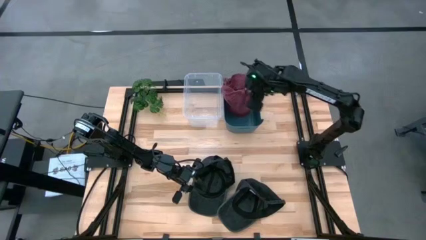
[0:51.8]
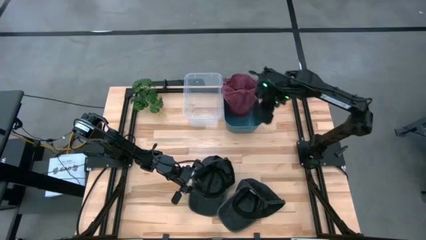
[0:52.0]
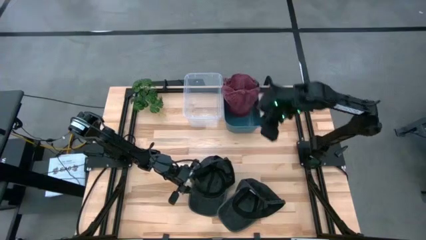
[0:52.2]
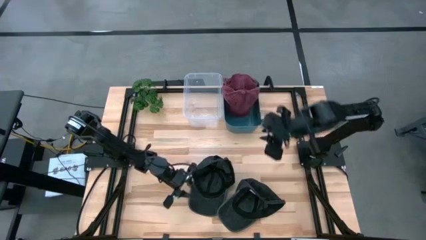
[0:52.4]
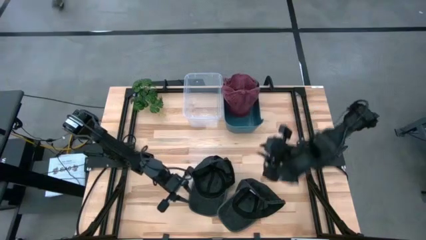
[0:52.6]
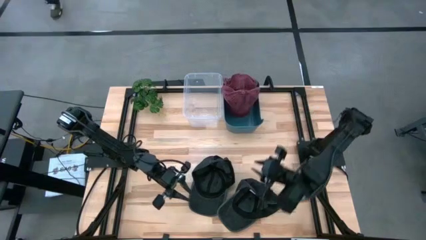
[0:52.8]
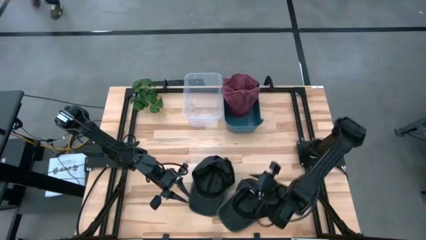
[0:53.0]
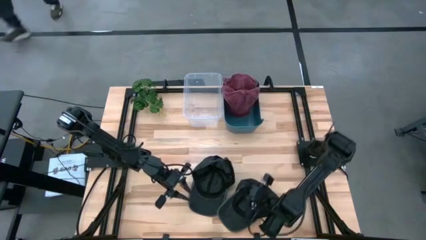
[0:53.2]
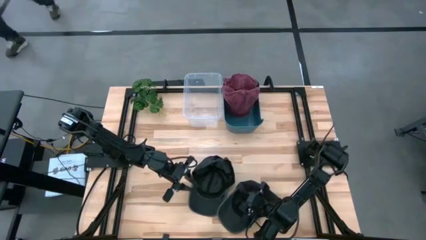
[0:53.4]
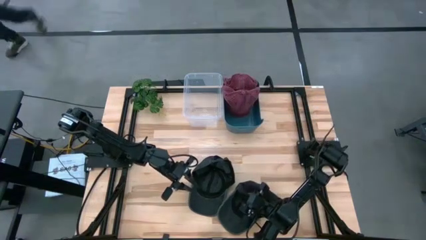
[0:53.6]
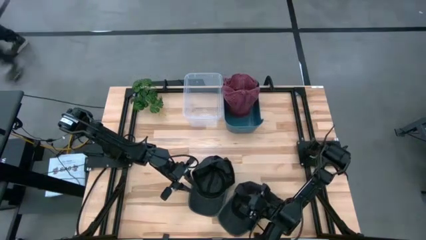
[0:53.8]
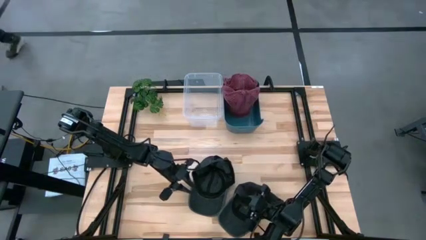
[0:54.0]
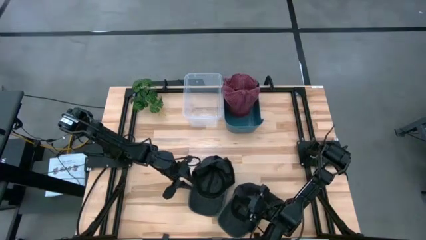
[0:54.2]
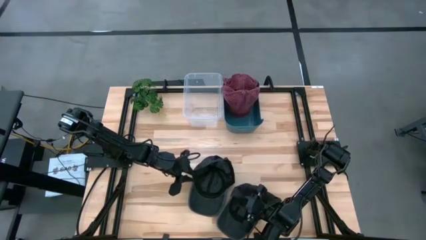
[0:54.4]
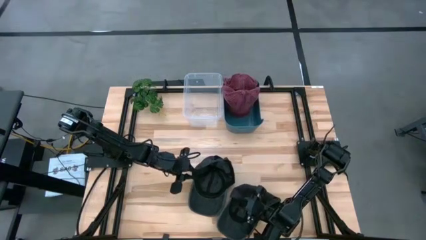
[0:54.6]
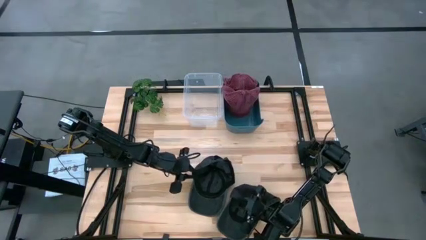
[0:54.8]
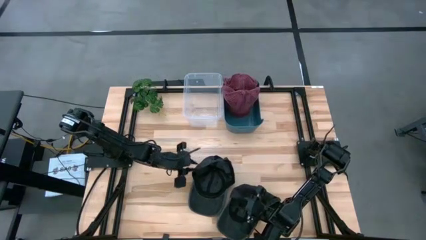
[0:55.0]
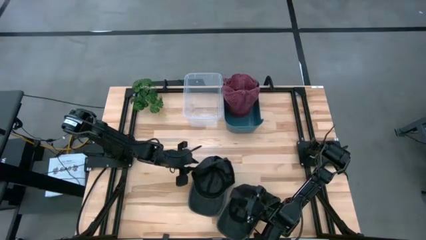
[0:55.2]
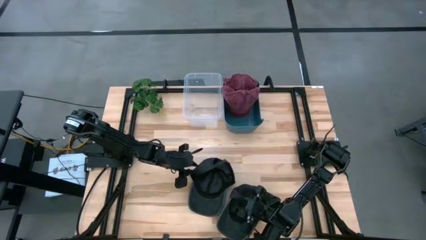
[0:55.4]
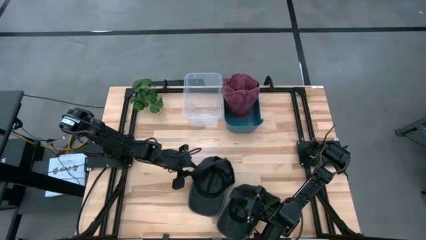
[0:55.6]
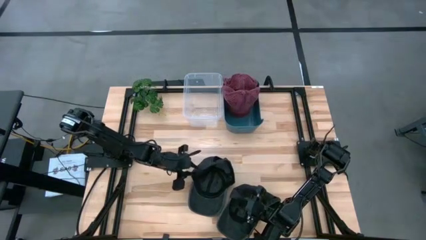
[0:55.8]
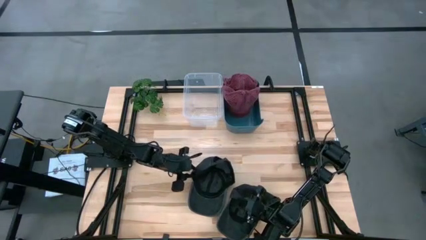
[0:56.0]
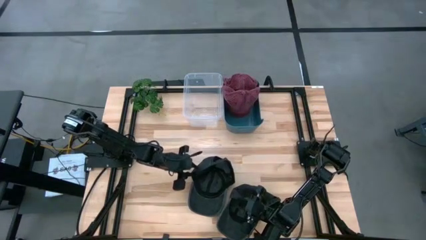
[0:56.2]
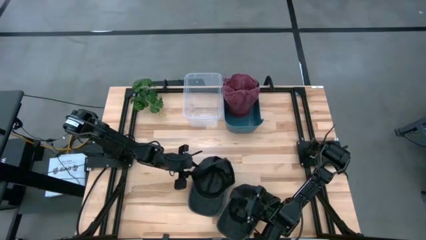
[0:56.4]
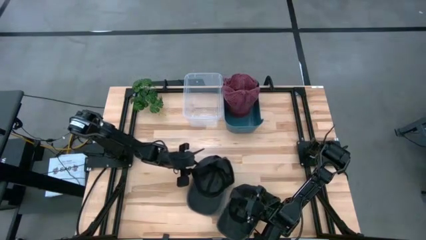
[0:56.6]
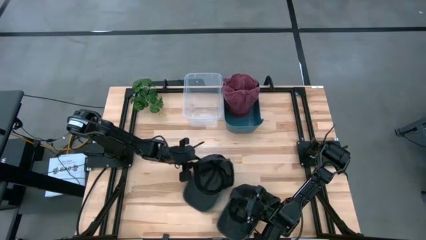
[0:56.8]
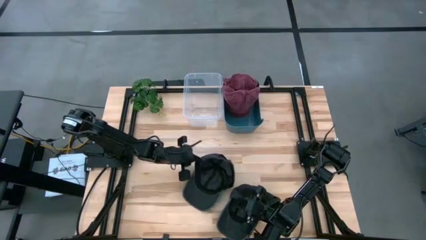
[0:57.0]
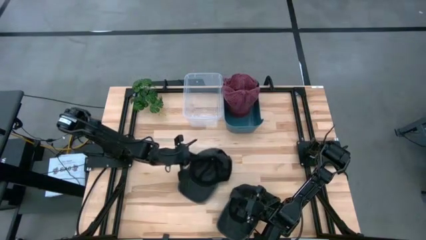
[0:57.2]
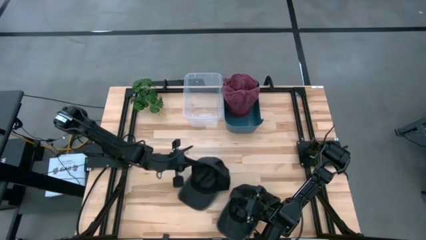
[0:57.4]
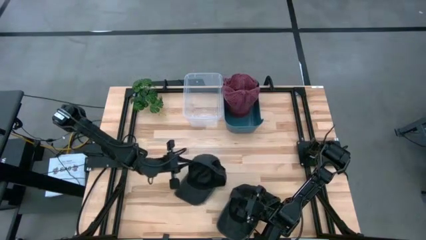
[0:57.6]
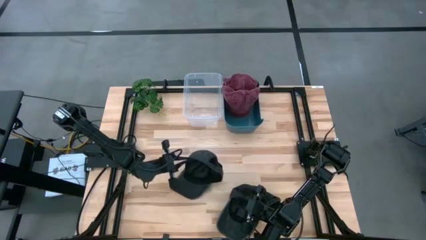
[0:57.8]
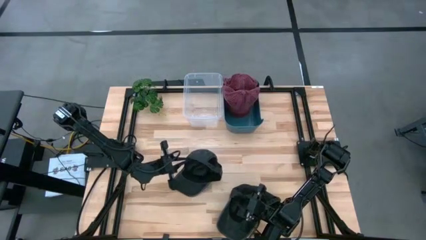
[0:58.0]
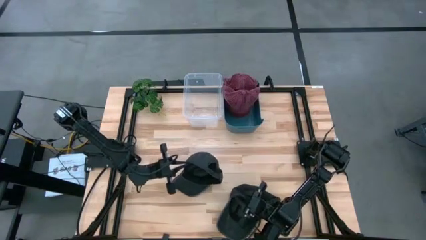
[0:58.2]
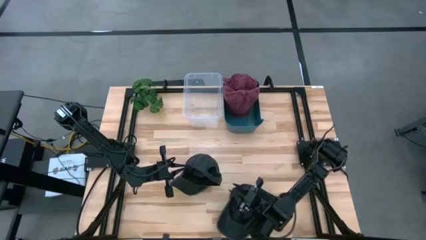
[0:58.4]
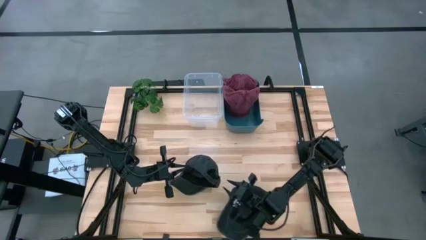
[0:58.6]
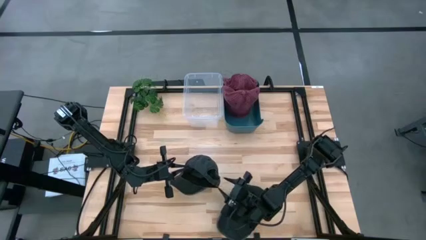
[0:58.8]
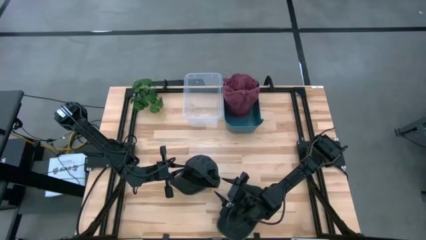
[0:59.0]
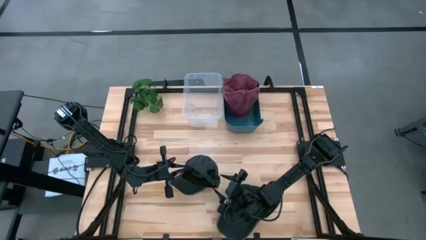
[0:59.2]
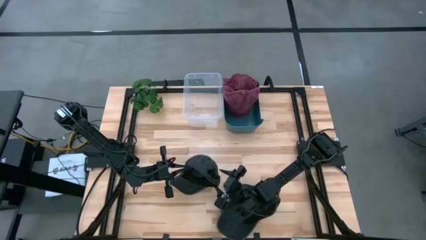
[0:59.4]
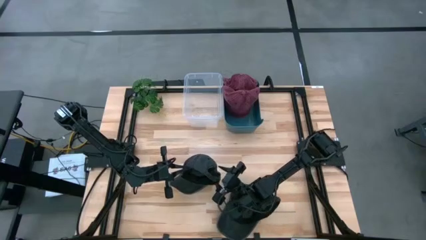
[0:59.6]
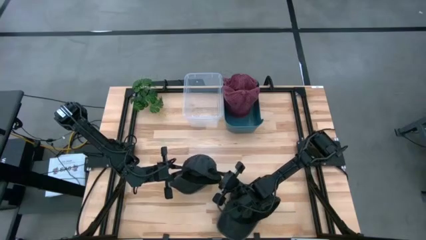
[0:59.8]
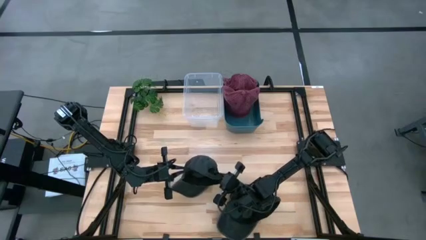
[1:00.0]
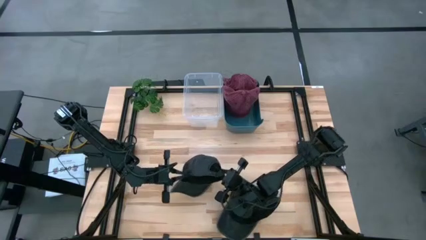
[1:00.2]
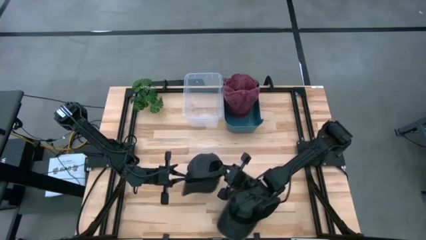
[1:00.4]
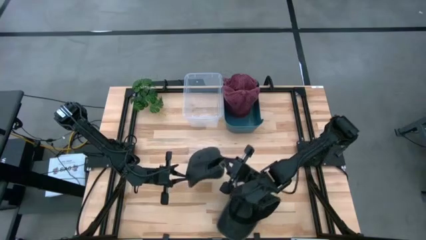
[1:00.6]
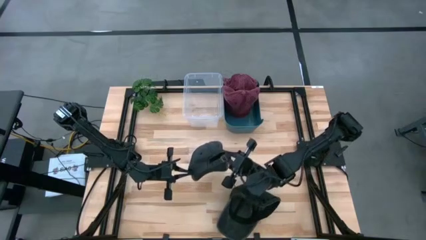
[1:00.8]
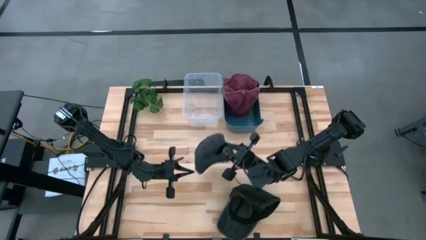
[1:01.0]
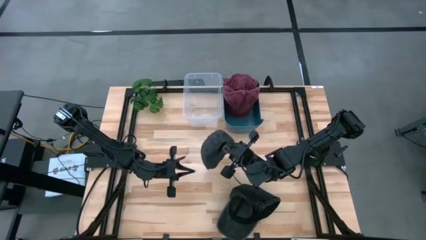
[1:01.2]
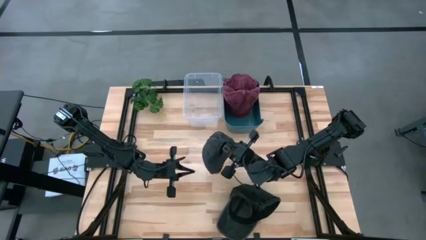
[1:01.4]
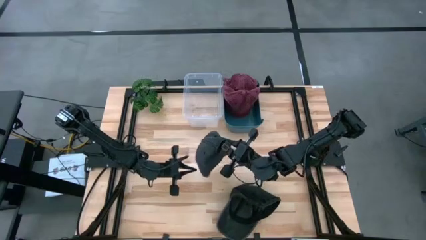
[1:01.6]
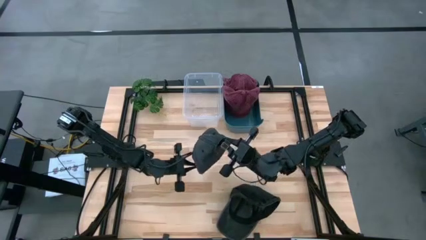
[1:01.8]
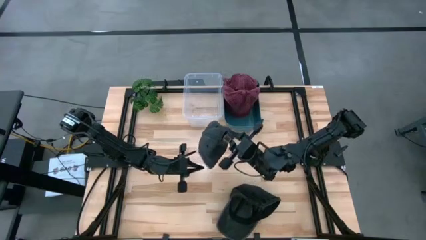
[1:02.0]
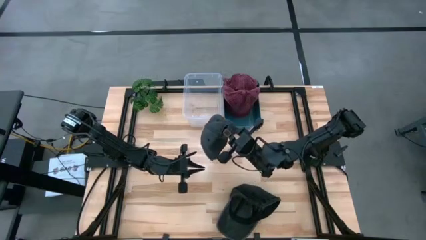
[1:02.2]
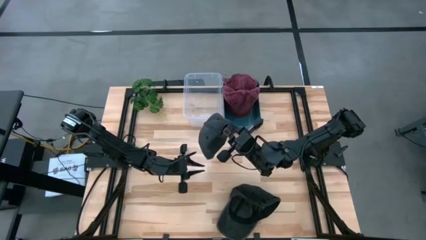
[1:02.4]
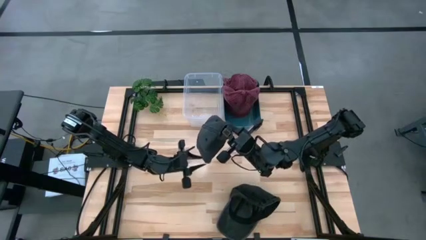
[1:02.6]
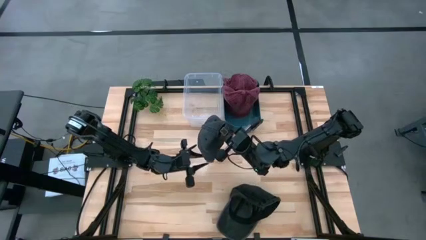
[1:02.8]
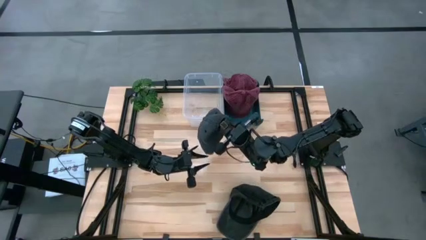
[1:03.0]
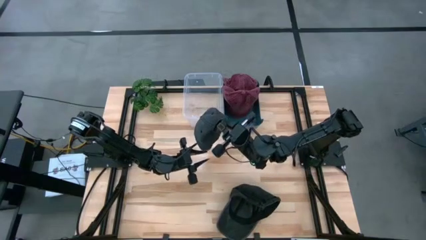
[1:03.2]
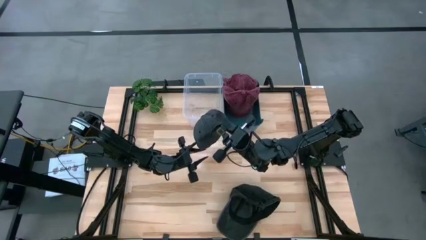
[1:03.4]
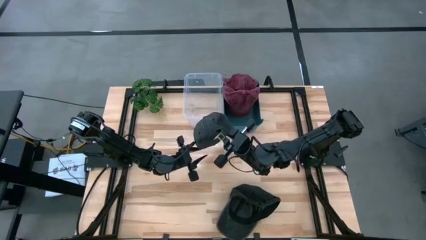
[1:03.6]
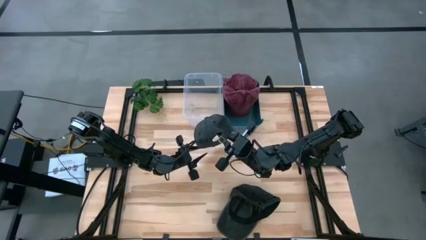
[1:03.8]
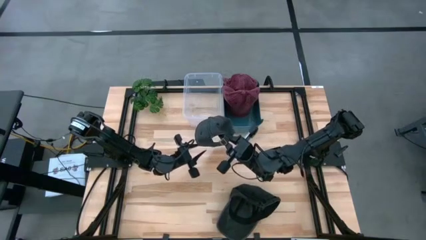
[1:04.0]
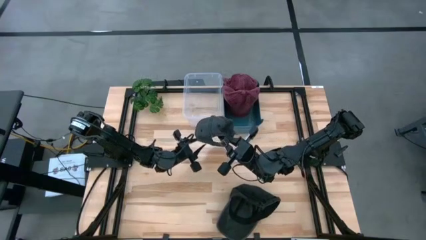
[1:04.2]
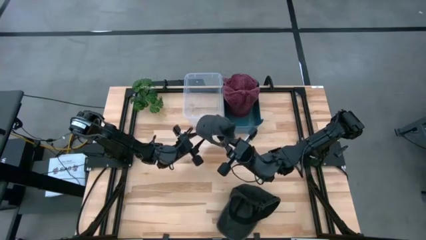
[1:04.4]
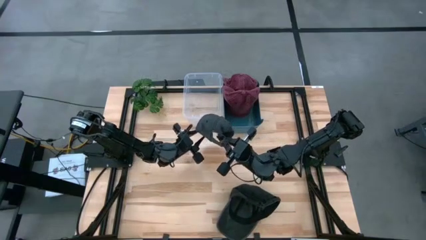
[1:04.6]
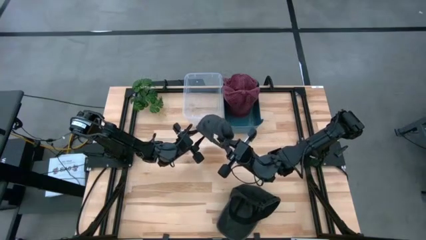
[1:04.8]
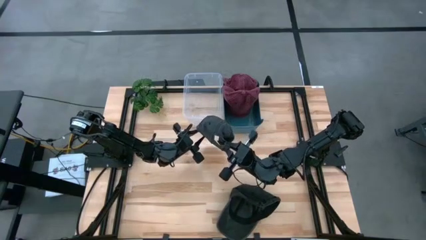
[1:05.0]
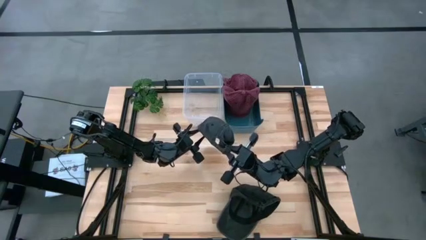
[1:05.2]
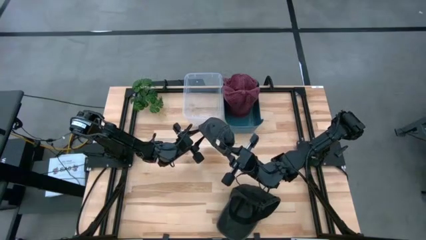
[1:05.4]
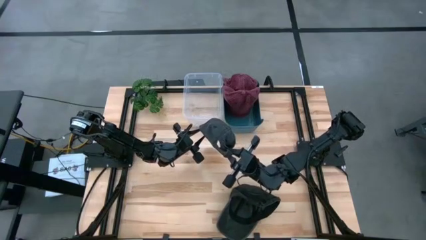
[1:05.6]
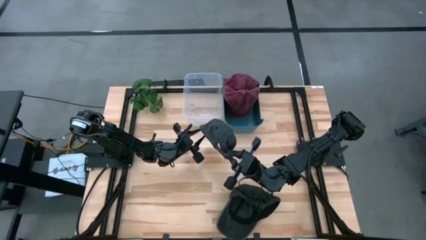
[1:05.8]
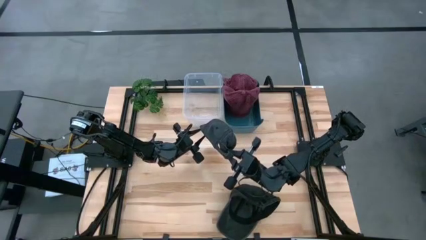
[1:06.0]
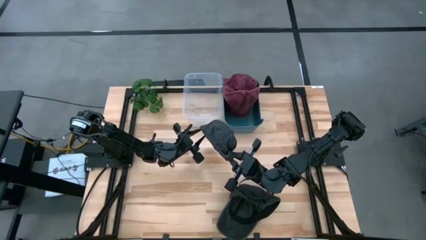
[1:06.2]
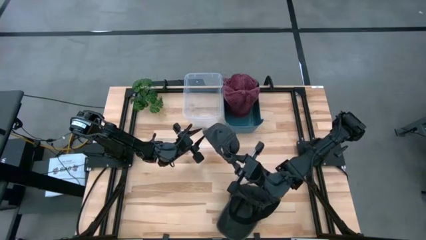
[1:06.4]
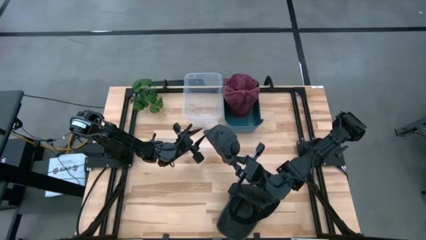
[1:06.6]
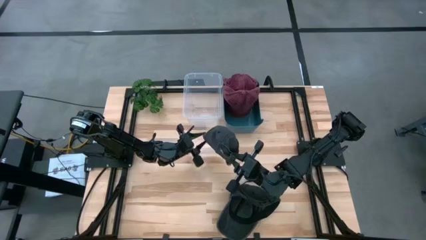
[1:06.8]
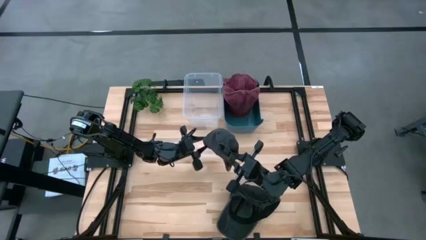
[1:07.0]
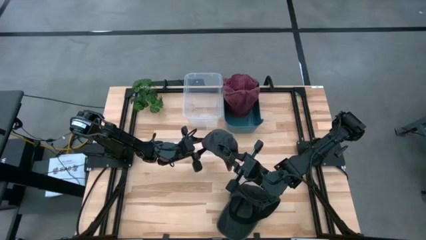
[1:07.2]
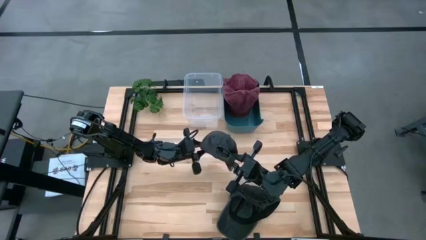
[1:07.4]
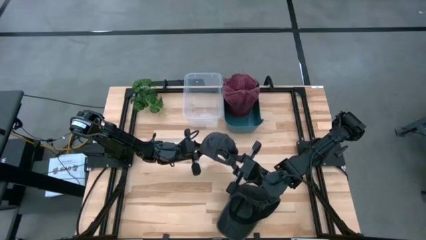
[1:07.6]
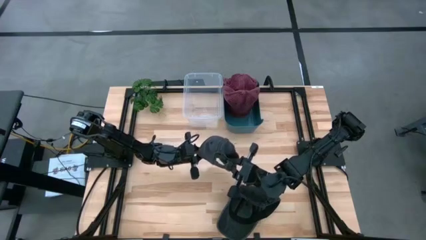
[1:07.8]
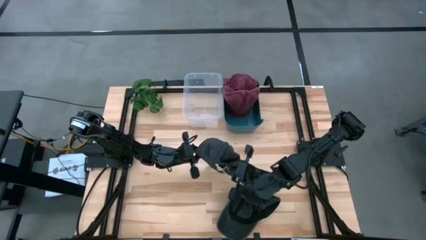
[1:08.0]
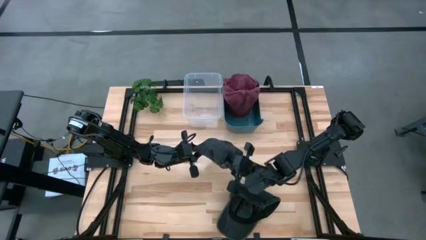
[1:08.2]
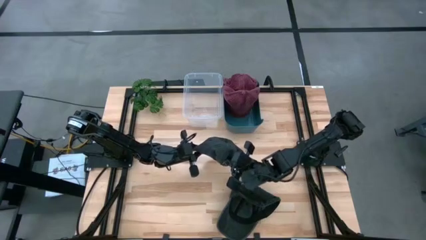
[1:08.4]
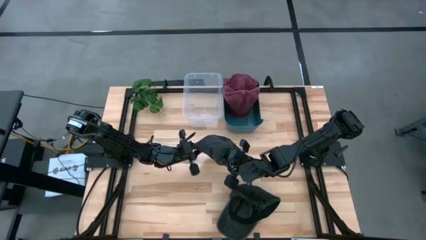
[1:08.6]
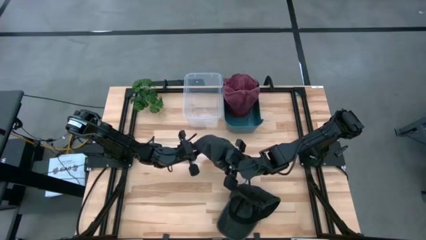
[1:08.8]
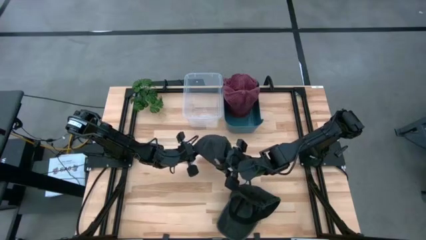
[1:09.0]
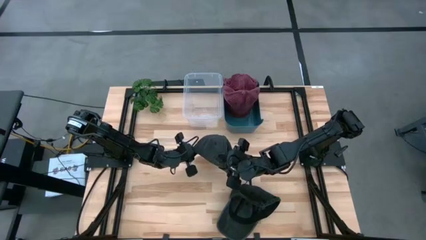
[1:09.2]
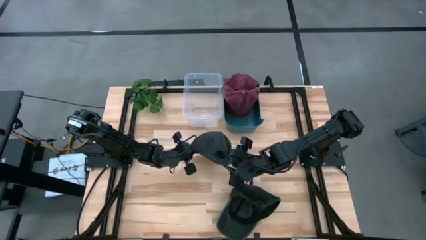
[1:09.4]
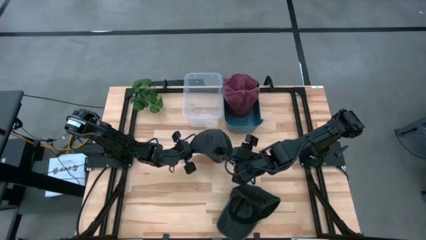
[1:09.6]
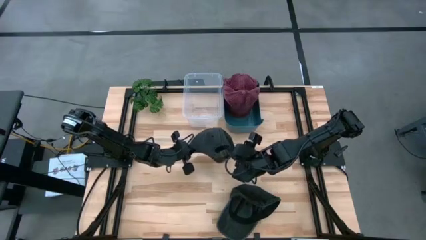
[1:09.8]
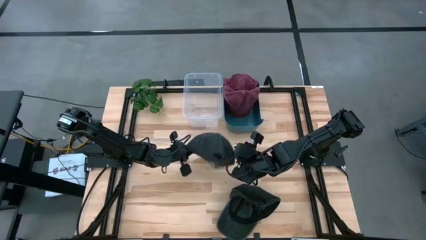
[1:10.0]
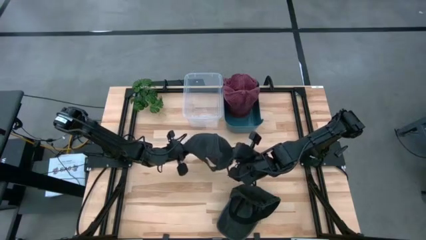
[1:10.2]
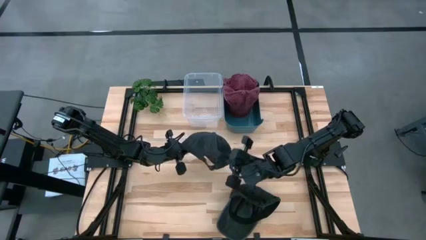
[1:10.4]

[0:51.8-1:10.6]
Task: Pick & Place hat
Put the left black cap into the transparent bin
